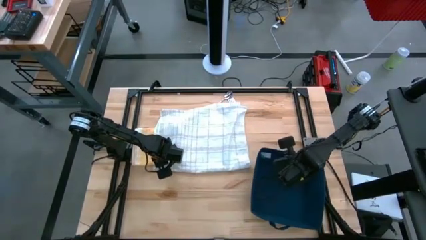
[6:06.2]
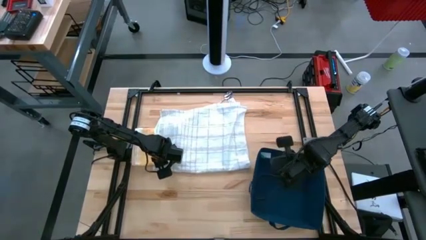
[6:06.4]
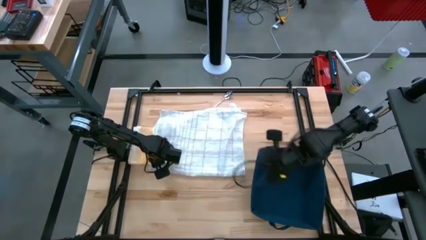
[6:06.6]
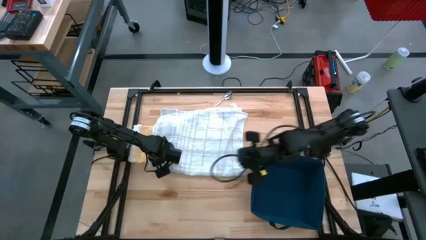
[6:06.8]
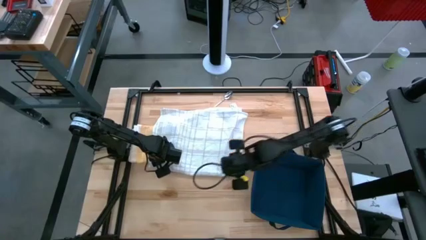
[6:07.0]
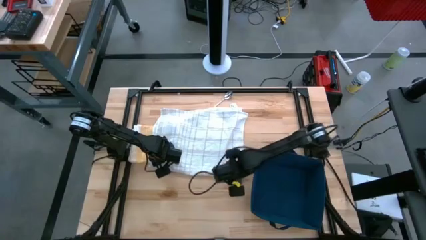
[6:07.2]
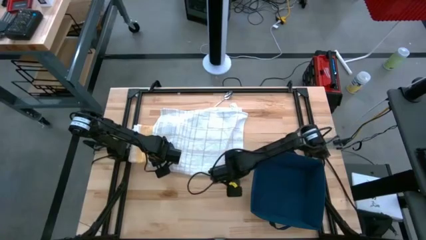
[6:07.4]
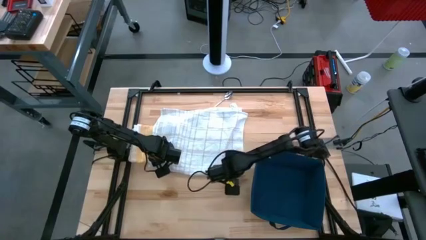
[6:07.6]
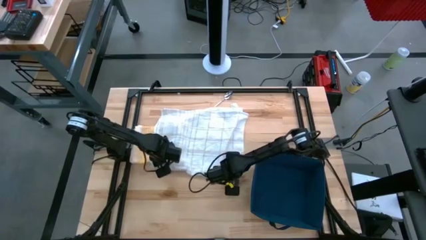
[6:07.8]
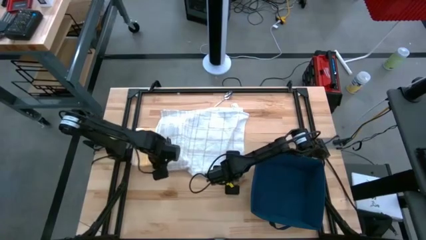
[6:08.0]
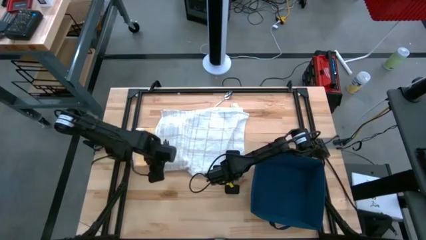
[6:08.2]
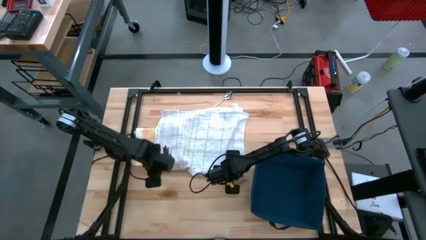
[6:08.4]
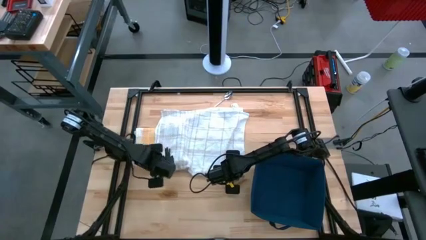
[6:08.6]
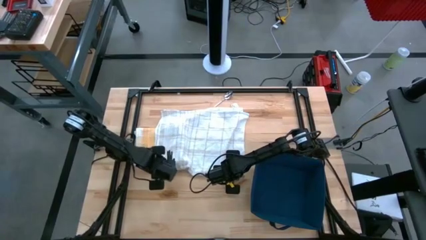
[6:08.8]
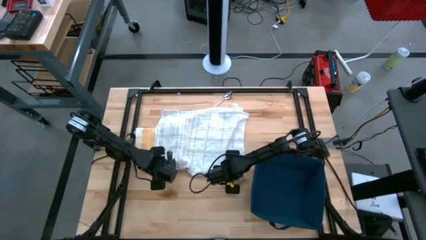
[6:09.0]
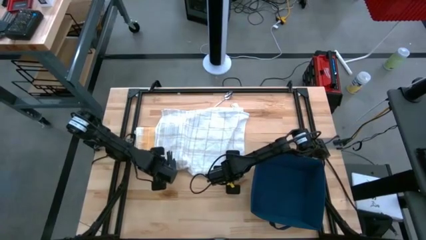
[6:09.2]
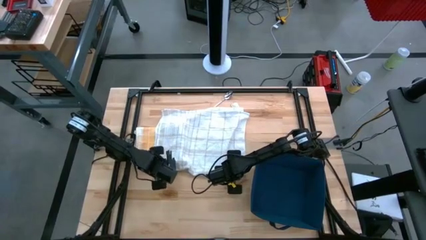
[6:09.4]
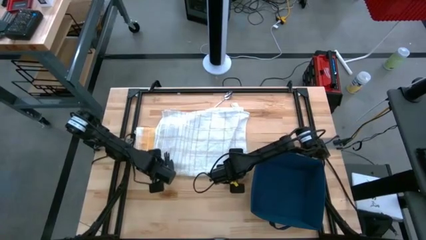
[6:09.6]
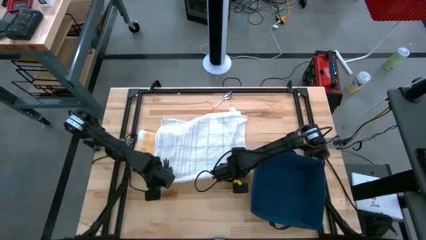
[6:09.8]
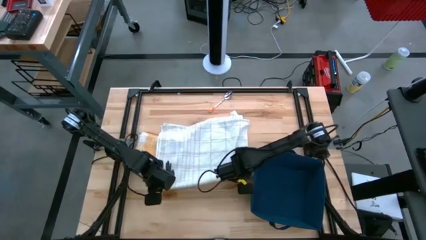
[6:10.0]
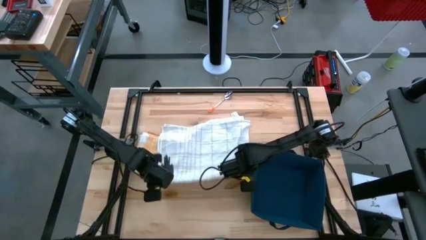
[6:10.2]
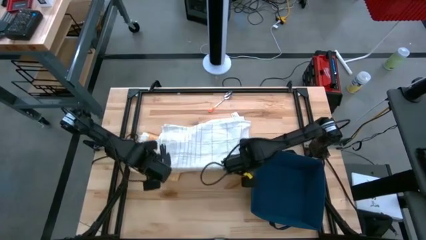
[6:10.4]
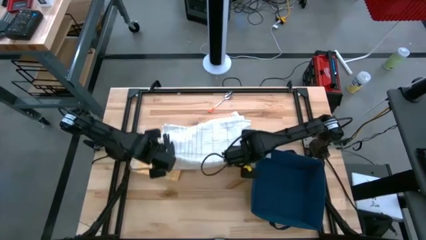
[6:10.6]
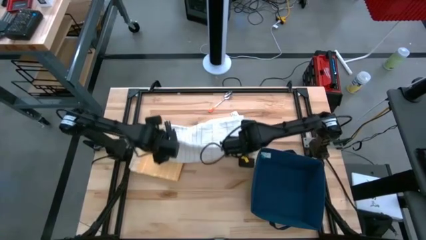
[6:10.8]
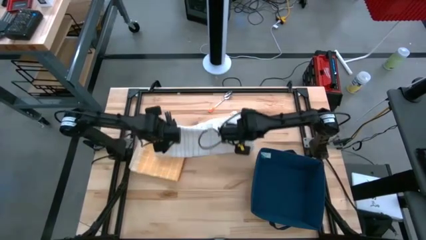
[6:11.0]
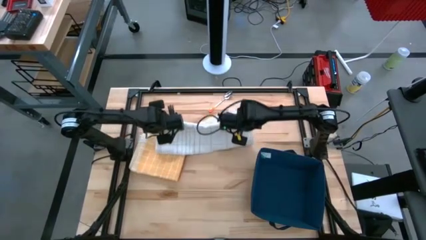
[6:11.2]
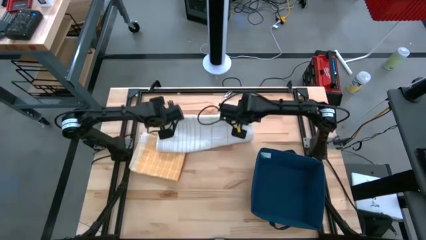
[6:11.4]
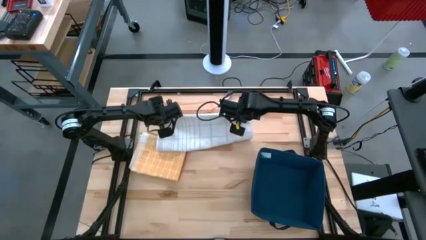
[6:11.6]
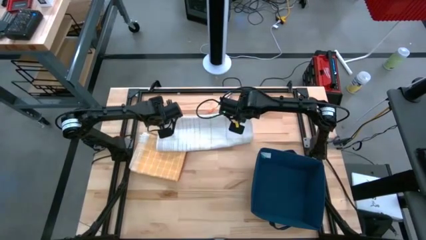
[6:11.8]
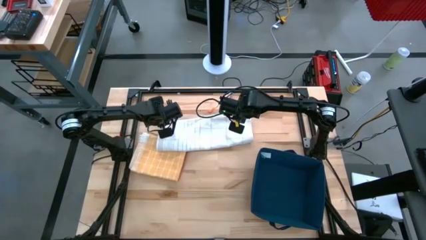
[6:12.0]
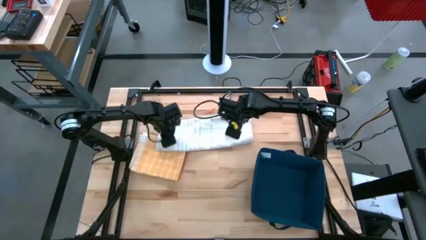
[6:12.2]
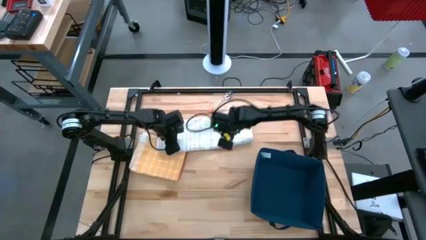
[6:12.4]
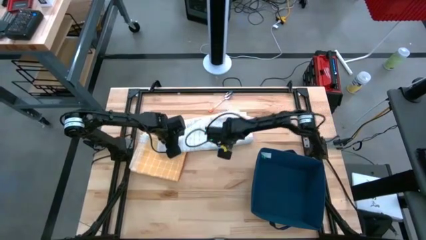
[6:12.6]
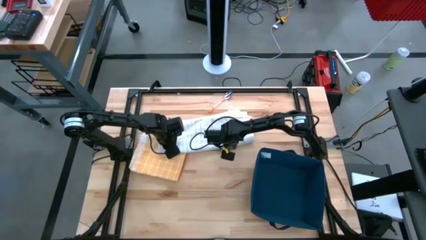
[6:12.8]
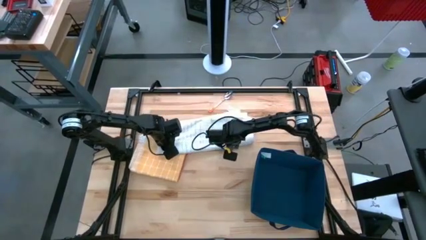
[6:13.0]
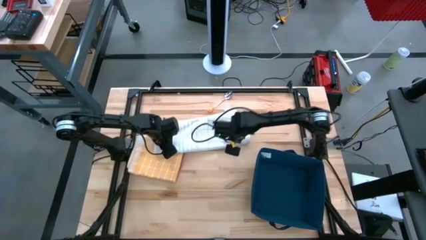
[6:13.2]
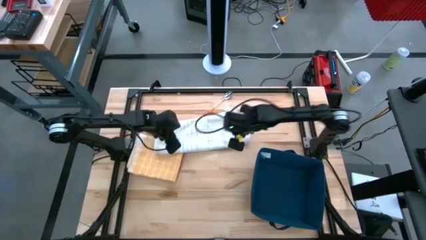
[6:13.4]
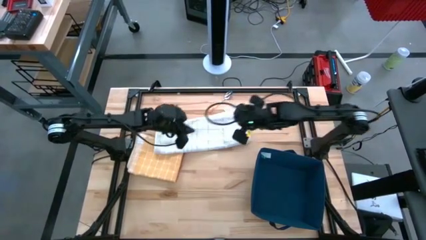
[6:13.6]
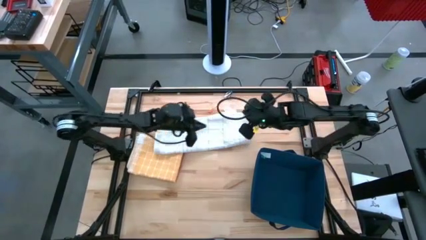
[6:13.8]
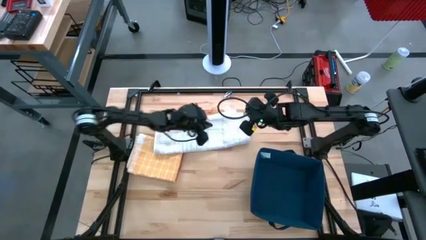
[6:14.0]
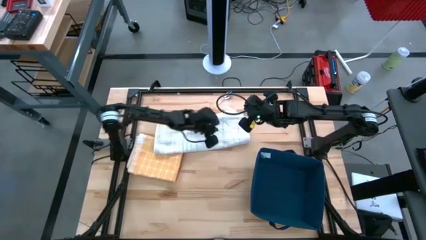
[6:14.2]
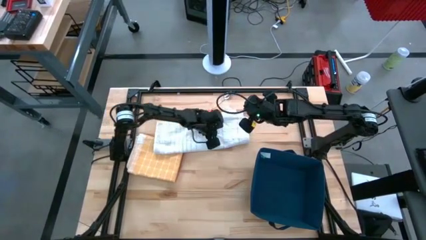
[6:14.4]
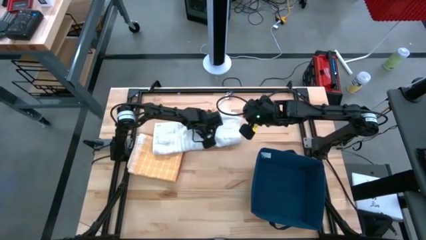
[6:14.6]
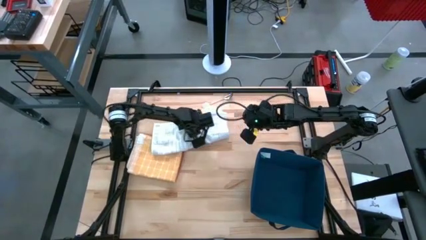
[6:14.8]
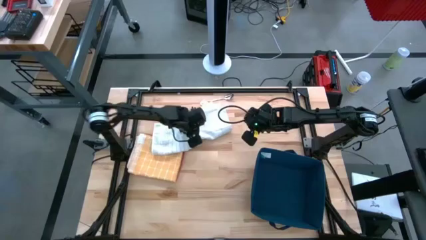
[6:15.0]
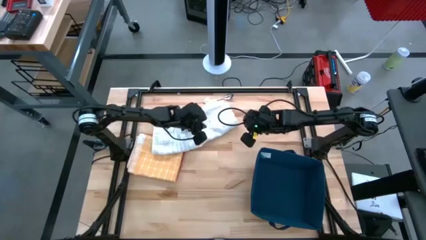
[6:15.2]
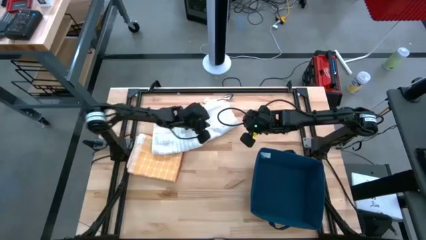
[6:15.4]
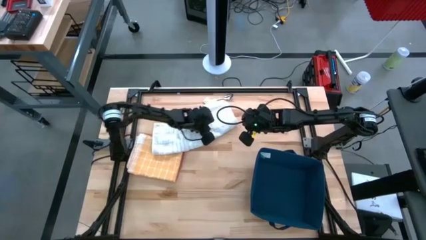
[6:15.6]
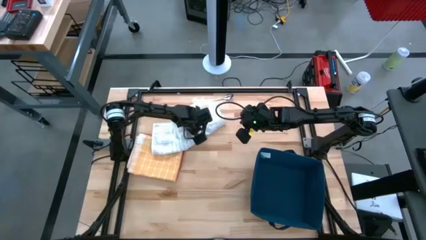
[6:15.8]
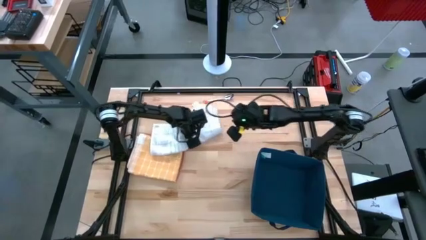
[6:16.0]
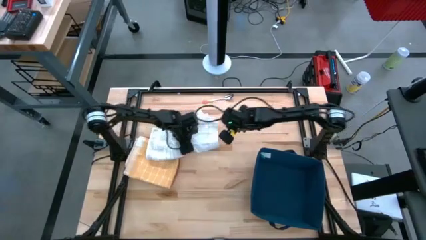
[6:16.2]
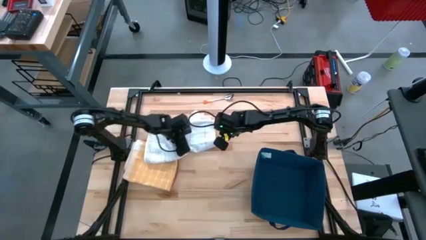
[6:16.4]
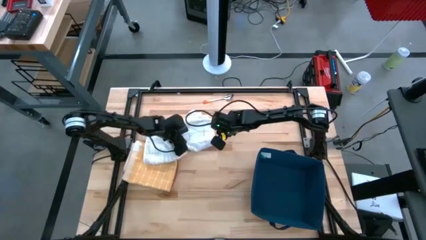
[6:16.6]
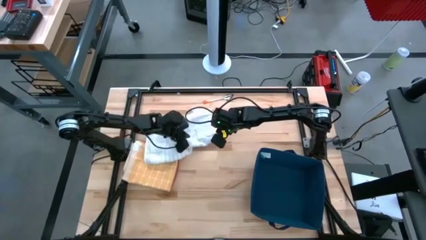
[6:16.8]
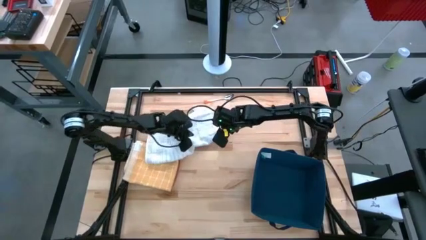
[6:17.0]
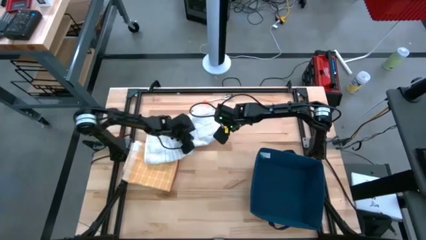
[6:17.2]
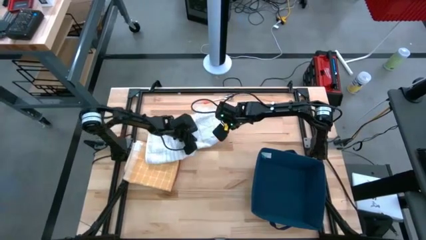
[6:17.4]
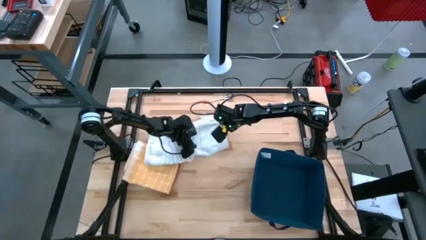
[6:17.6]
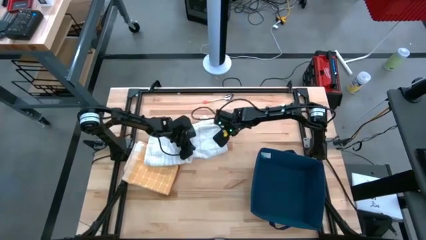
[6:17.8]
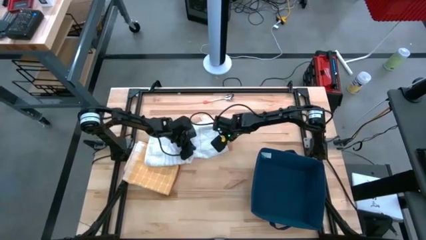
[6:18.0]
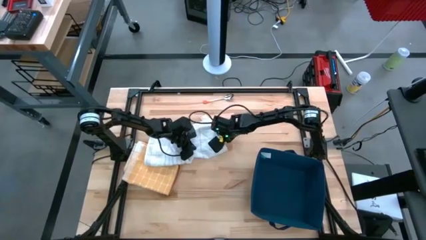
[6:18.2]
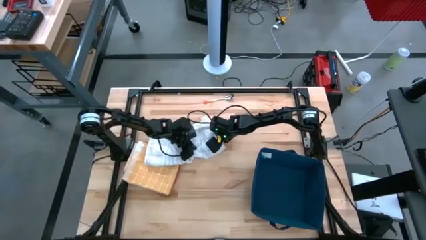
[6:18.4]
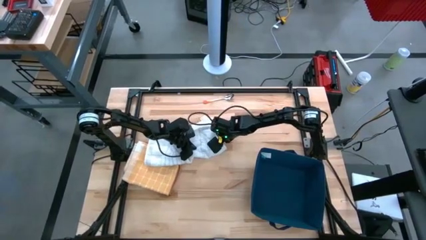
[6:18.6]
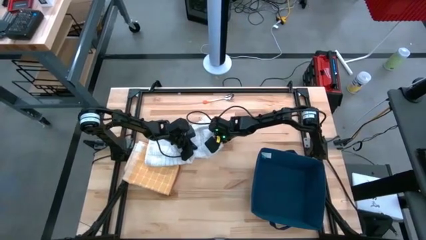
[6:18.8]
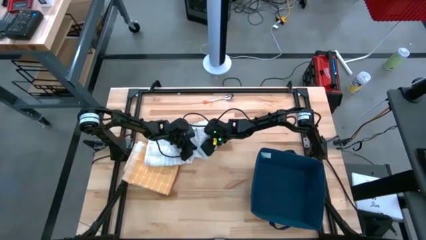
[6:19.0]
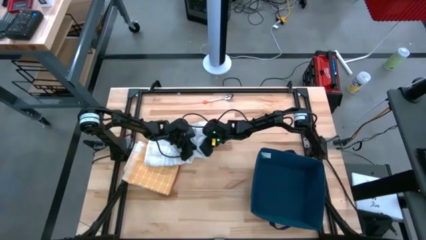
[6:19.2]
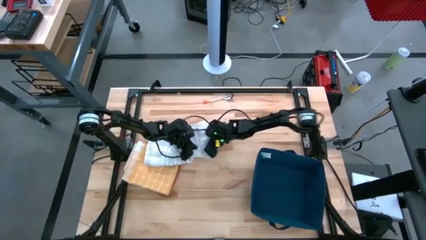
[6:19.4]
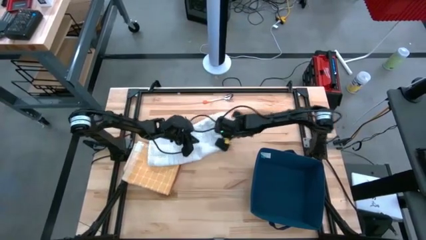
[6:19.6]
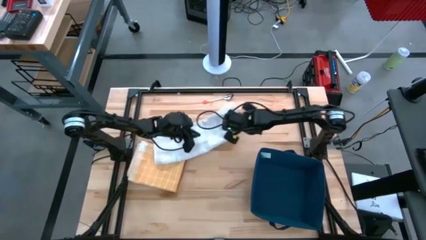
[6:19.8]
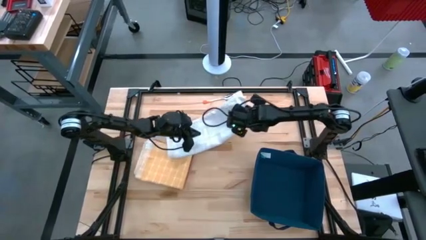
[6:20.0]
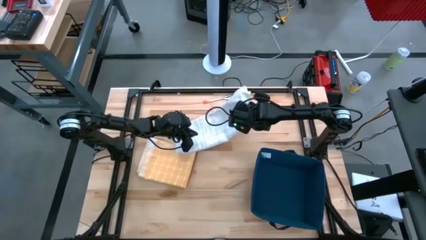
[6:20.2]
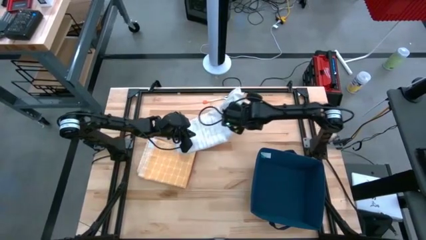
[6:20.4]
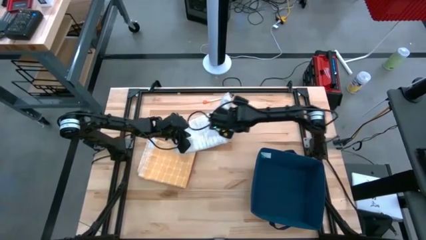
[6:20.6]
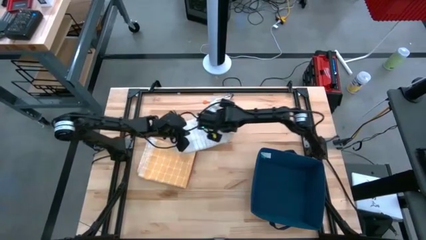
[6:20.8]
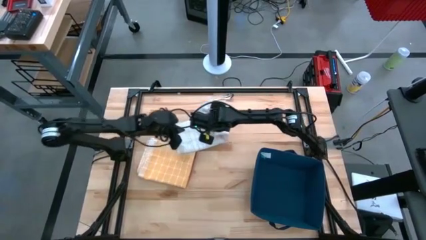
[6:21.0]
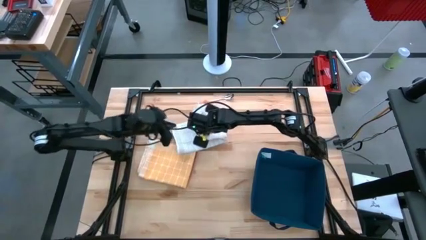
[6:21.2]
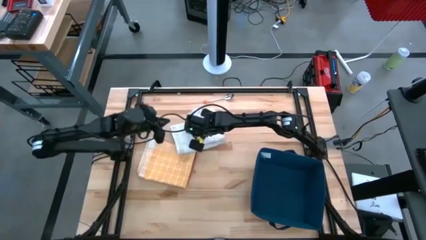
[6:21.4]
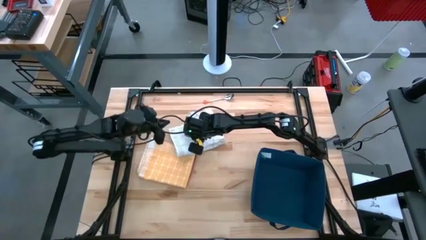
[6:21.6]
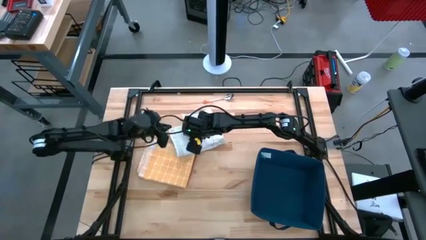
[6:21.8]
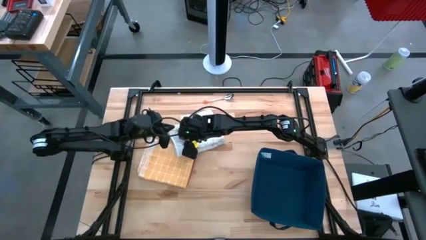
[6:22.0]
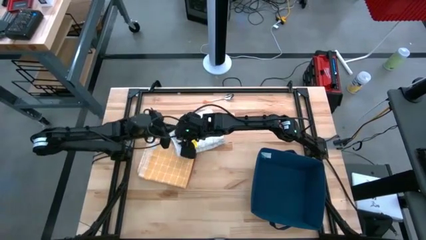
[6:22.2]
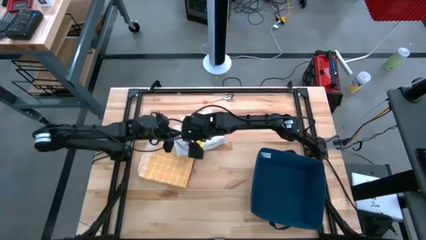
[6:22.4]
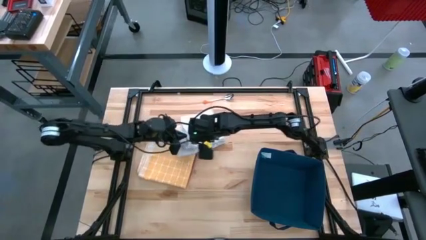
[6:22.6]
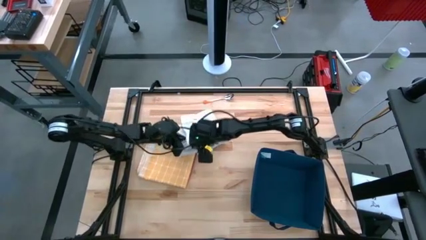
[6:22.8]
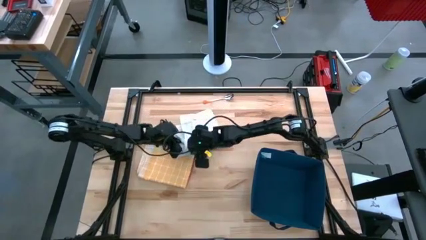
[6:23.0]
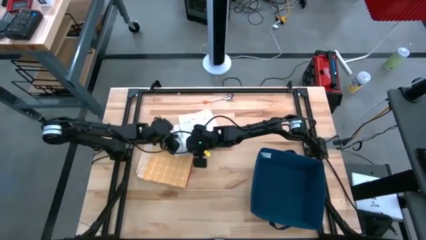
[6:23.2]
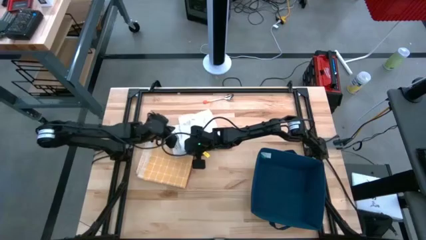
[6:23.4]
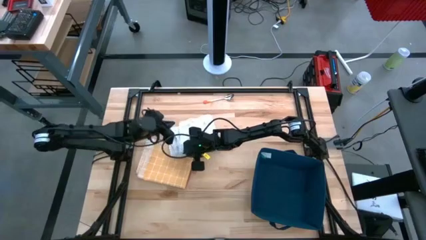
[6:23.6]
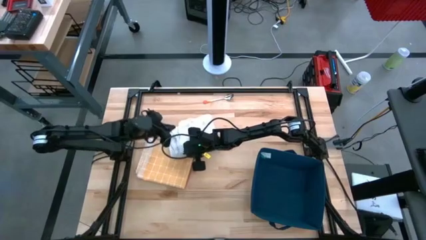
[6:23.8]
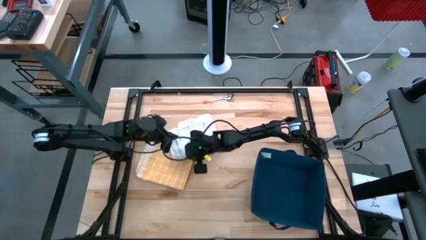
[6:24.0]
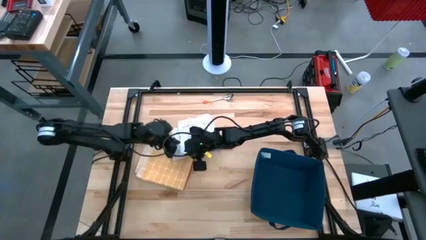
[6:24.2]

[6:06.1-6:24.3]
Task: Fold towel
Fold the white towel
